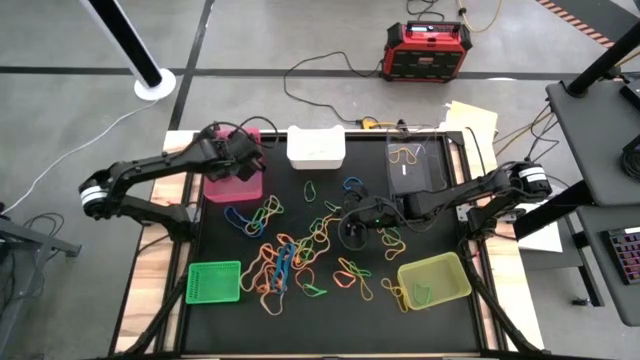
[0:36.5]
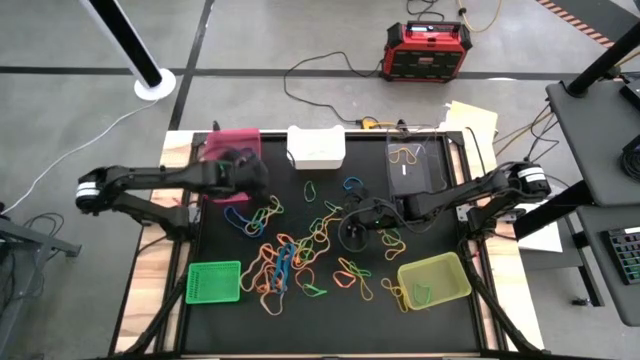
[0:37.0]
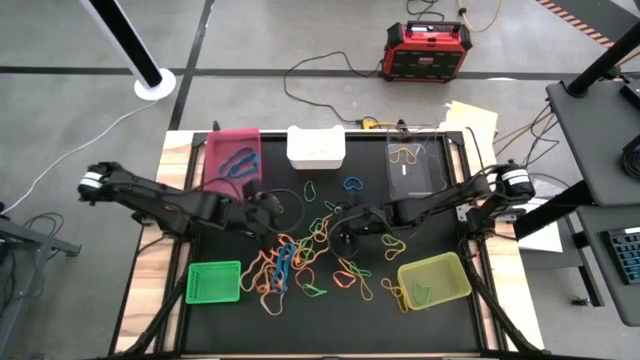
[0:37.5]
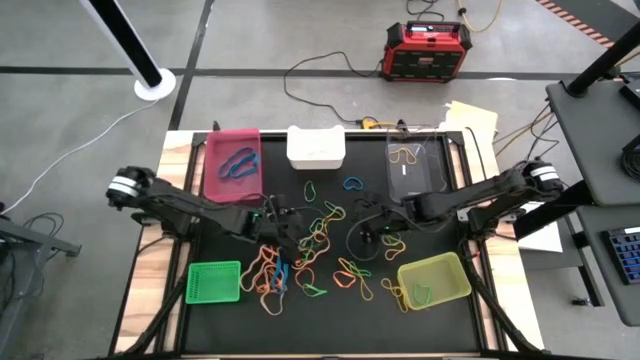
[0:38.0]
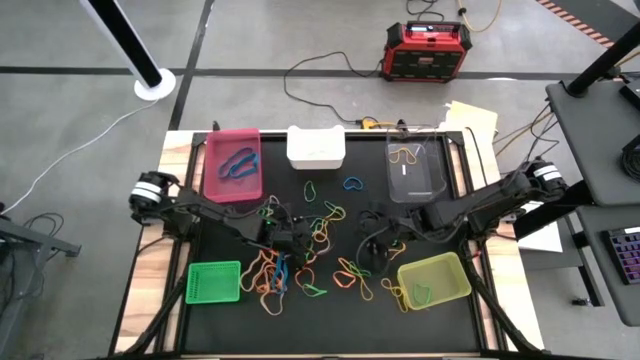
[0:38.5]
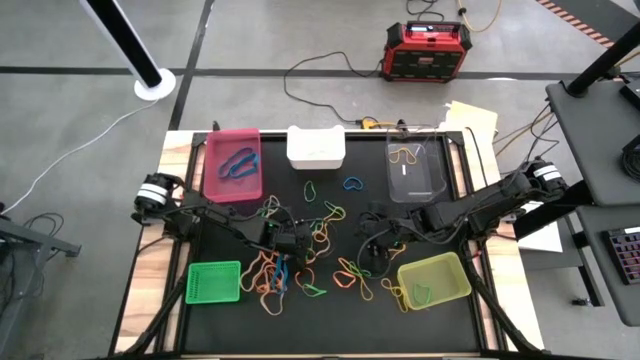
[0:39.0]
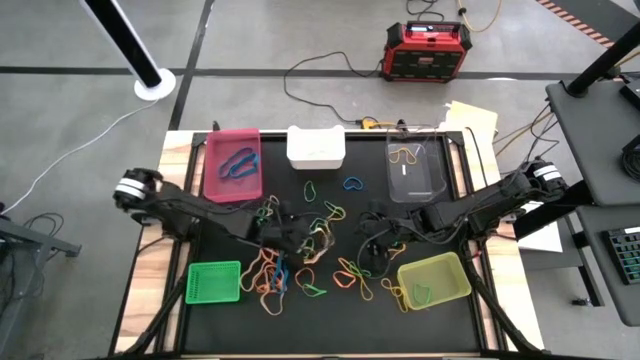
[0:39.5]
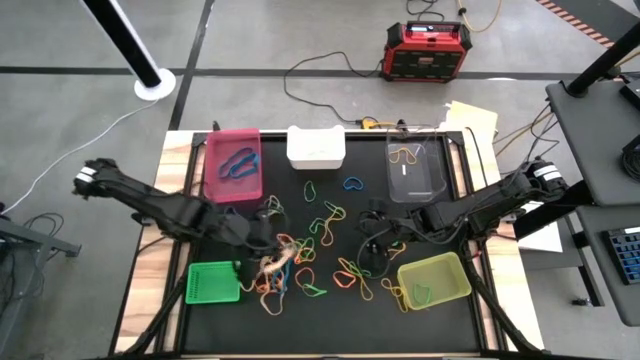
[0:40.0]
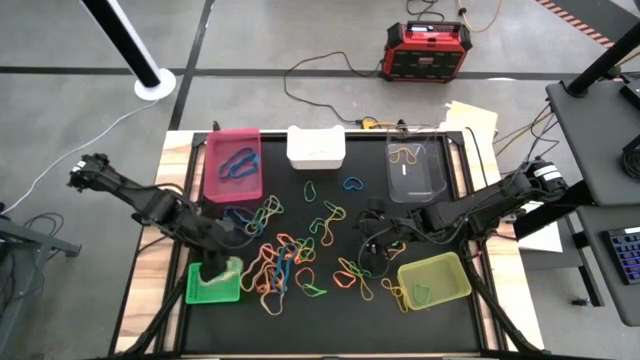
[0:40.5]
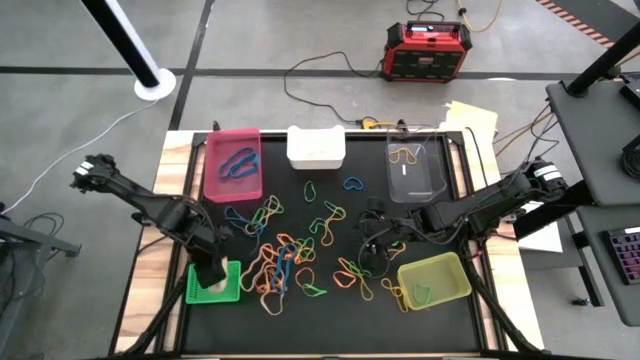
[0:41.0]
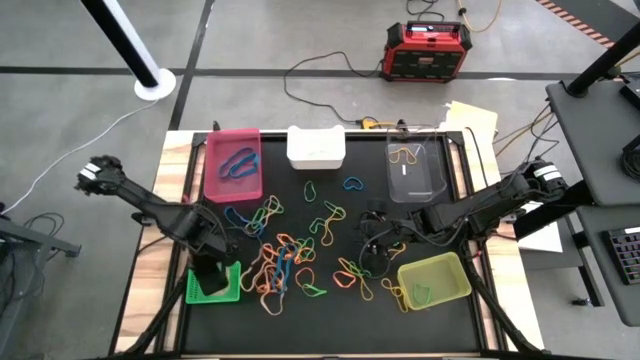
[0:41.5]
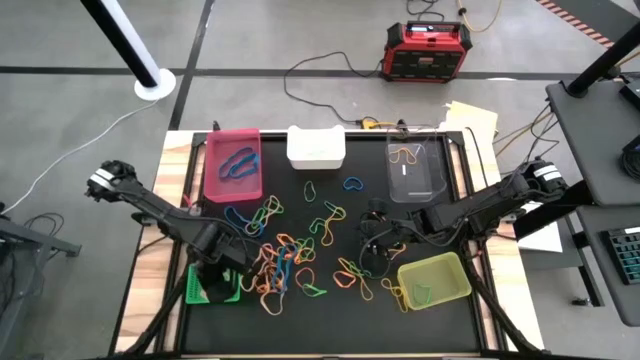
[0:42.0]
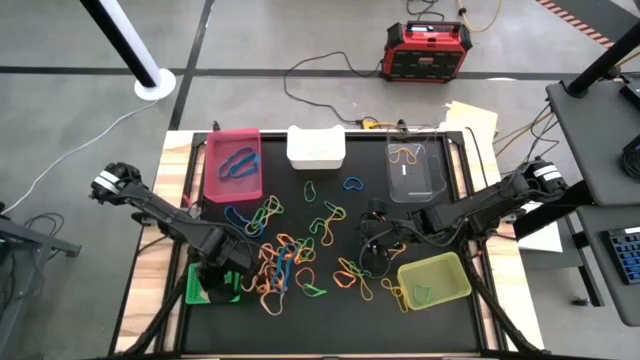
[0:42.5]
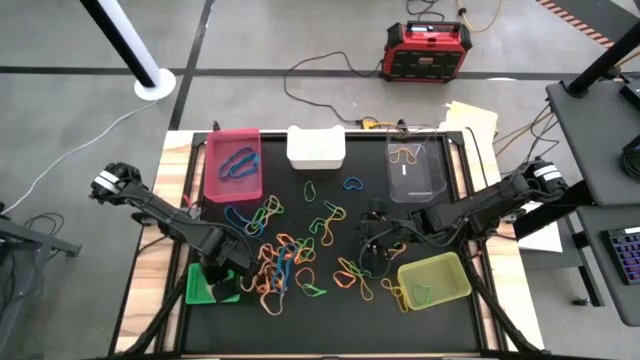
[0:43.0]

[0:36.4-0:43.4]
Task: Sort rubber bands into baskets
Put the light yellow rubber band into the green bin

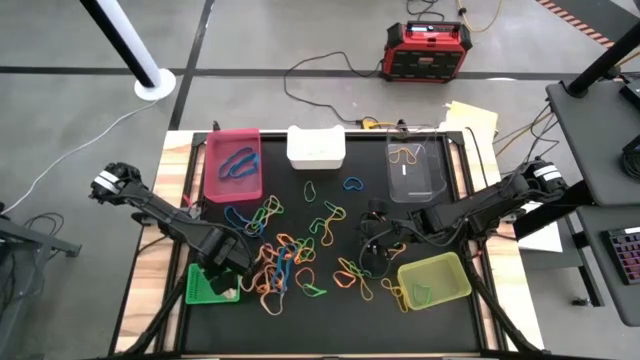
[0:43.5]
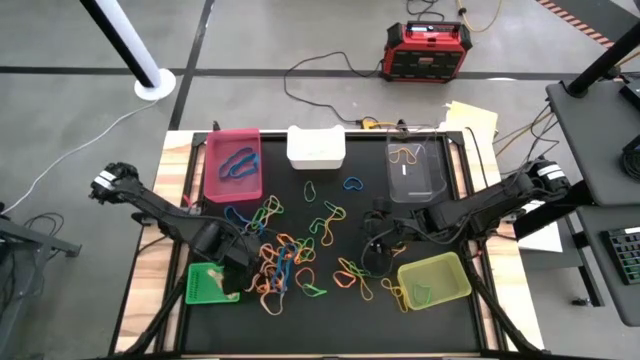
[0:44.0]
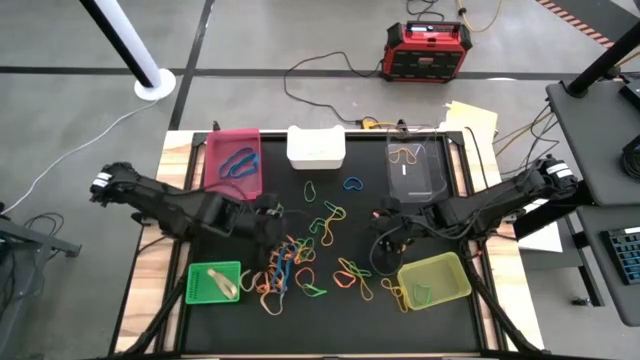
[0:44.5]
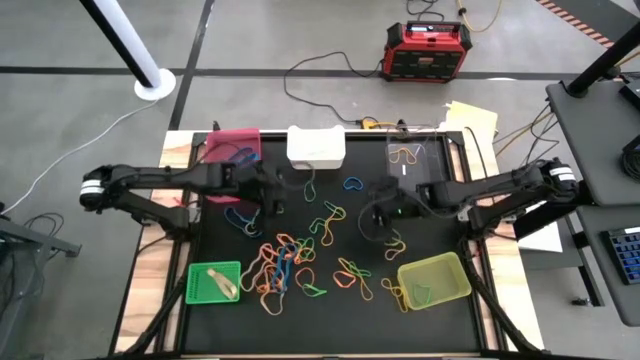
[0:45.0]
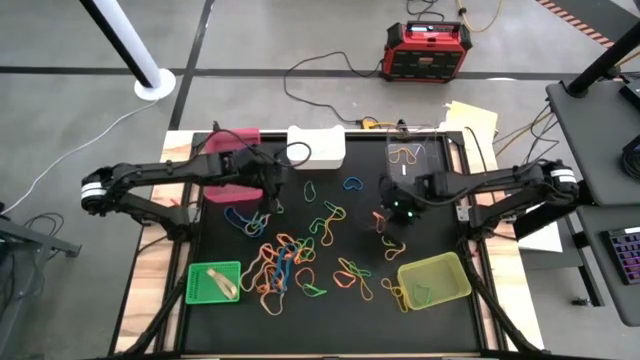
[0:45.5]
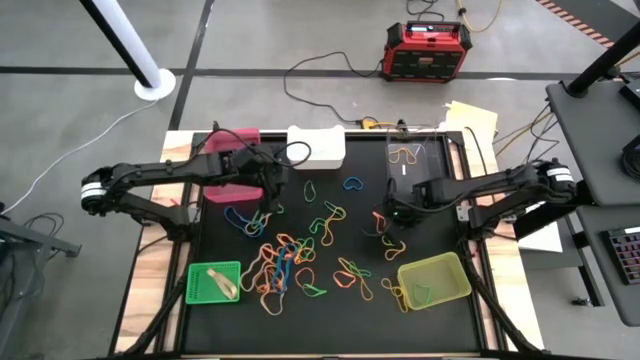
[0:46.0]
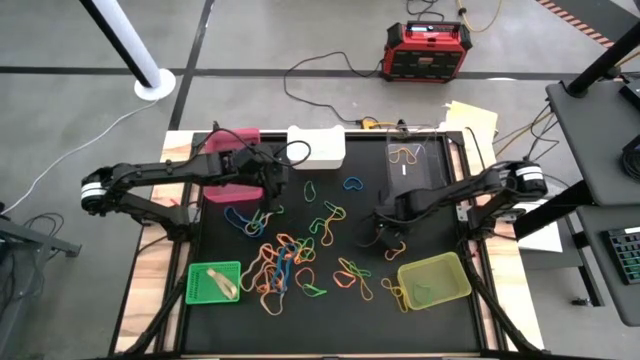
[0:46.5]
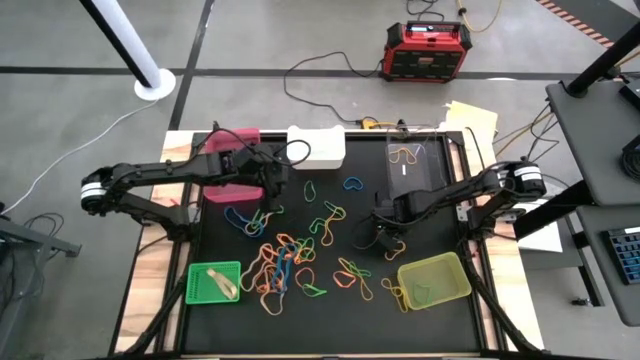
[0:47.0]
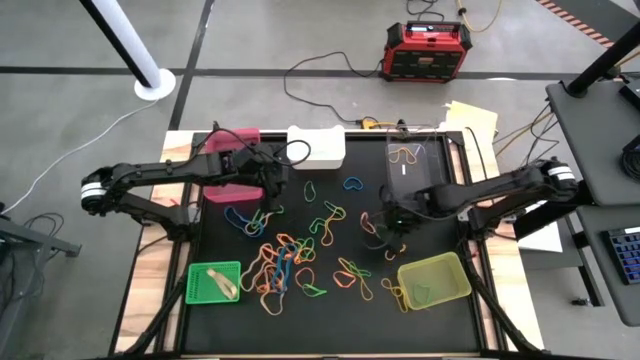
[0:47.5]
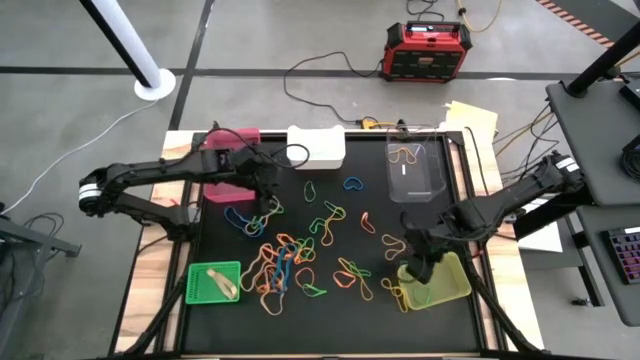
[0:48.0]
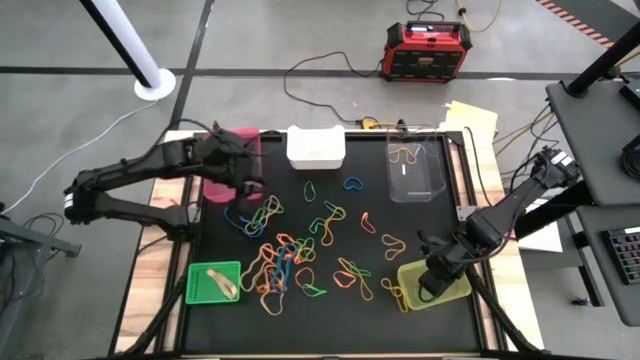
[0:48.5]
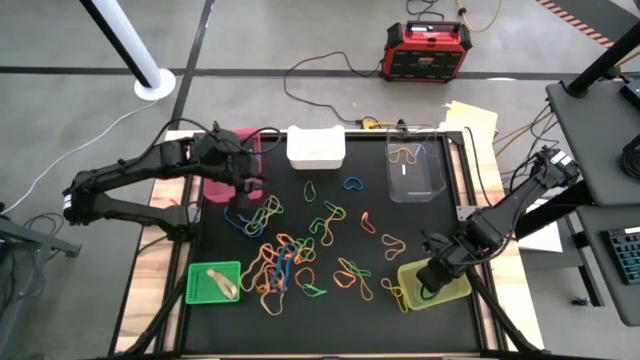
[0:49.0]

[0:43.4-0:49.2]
Put the green rubber band into the yellow bin

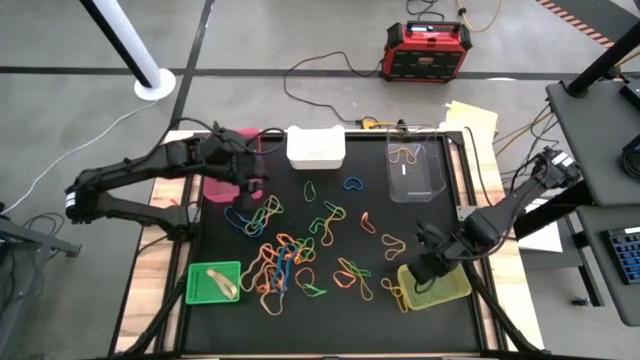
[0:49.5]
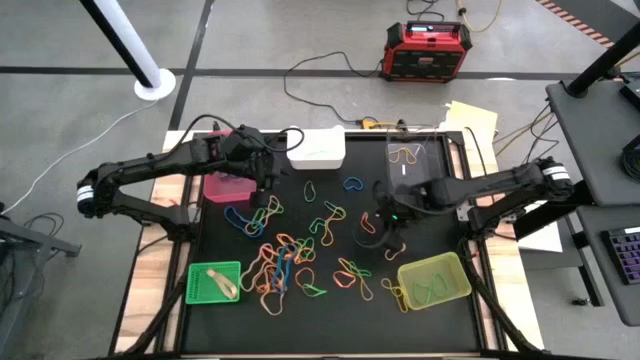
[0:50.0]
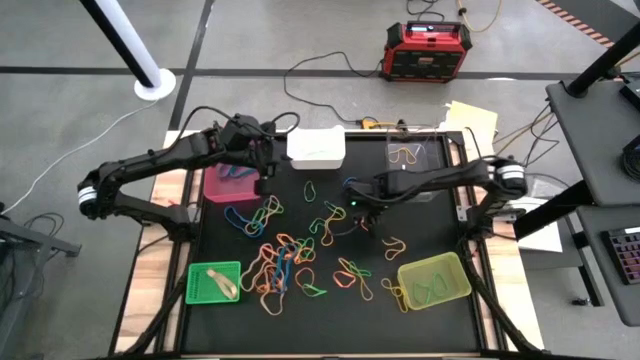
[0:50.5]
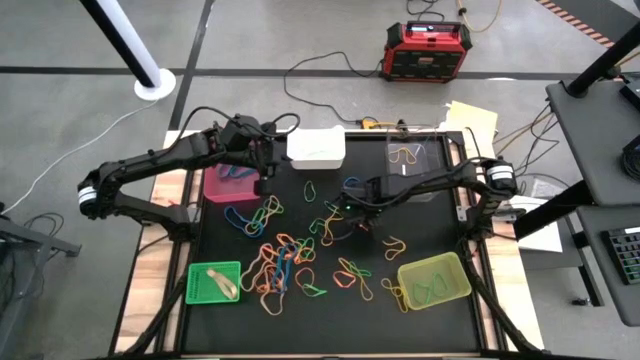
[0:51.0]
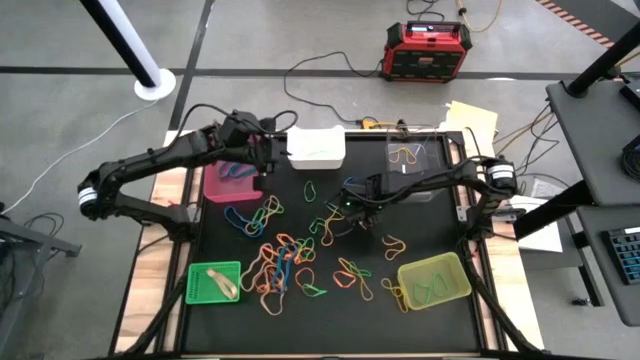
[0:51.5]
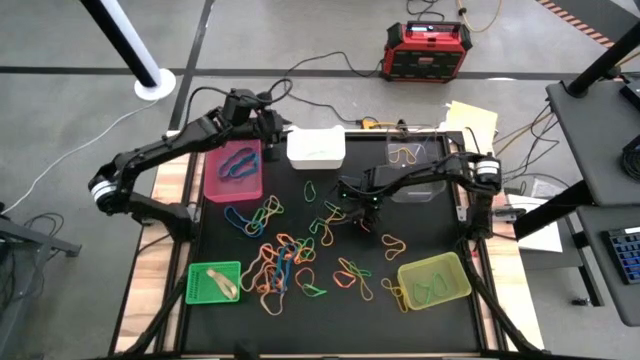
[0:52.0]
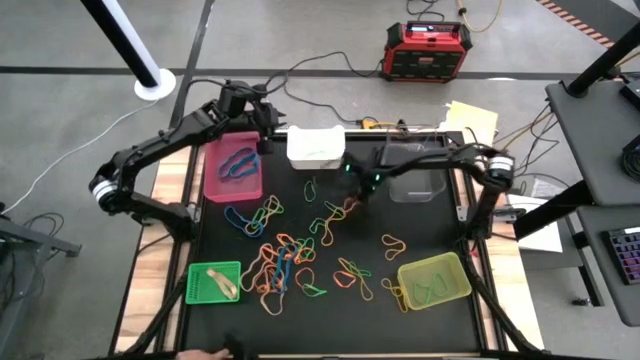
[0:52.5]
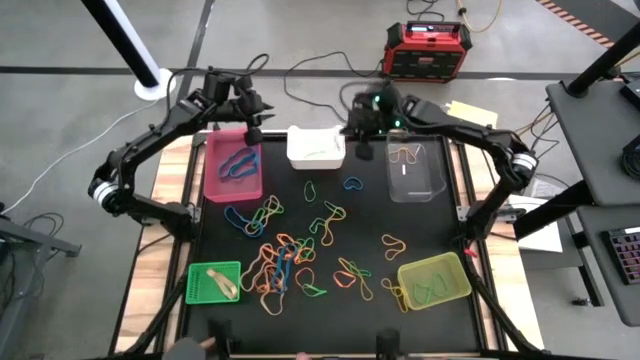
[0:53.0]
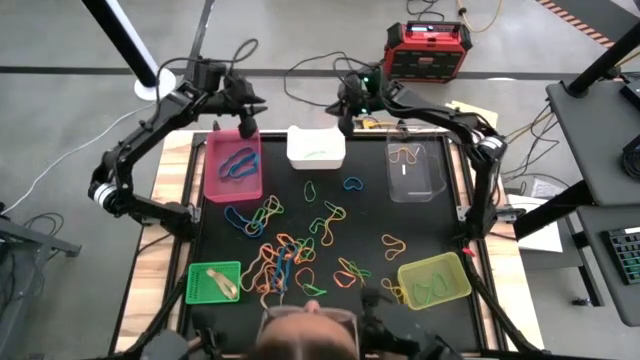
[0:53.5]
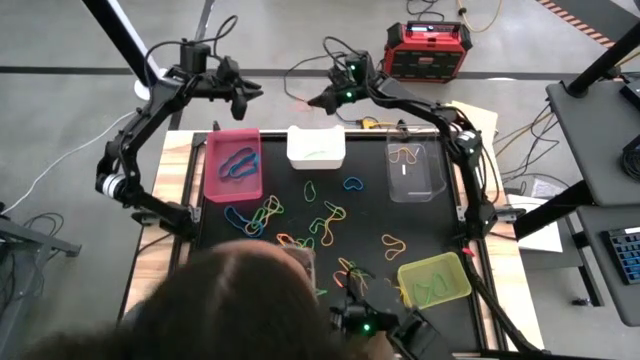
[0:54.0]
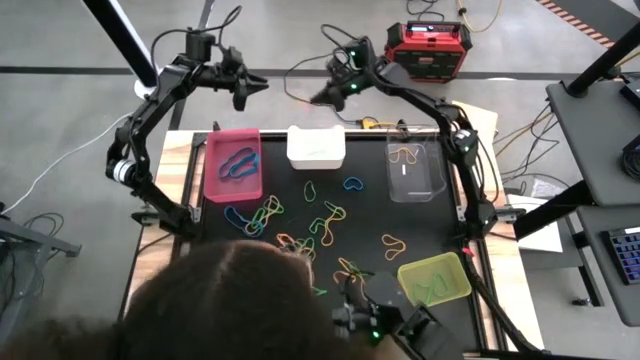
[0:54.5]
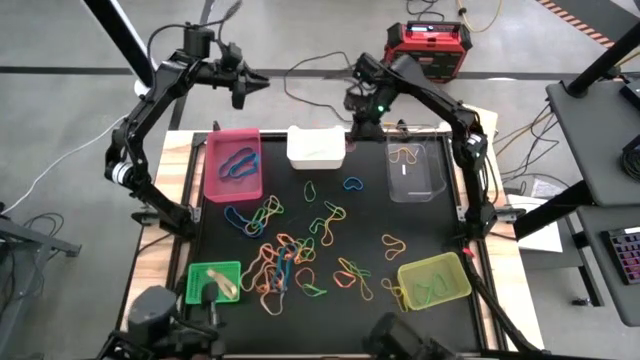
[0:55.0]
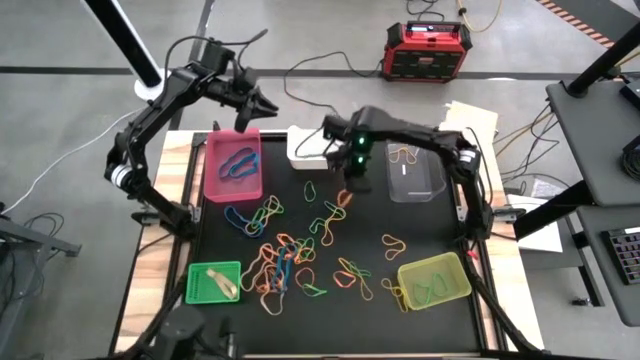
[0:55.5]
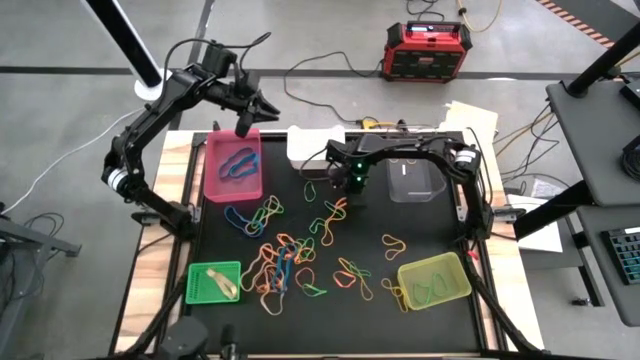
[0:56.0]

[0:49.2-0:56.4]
Put the orange rubber band into the white bin

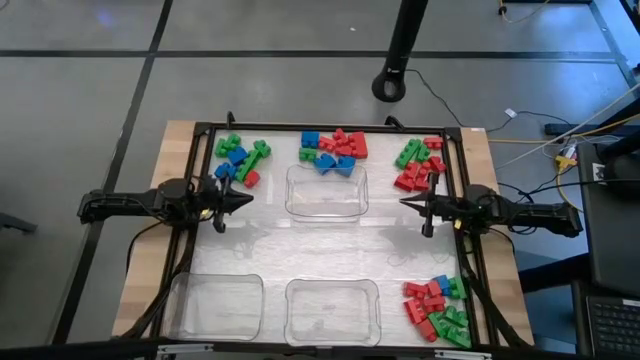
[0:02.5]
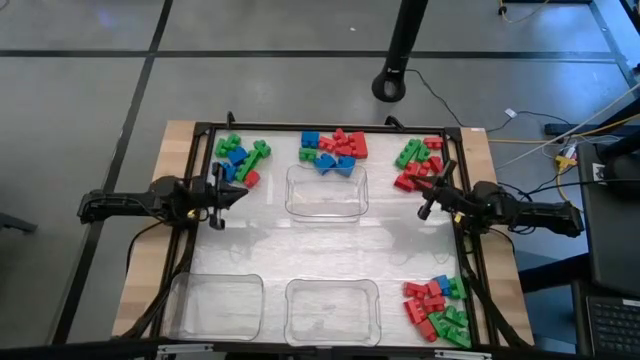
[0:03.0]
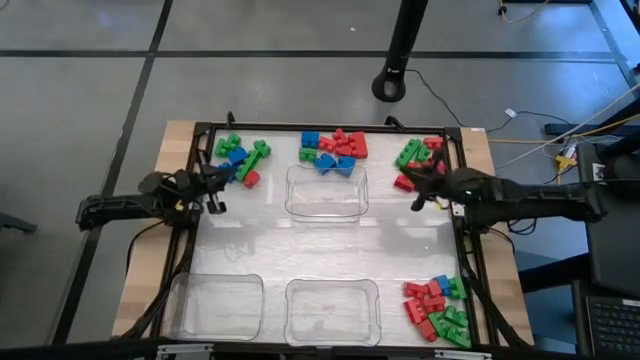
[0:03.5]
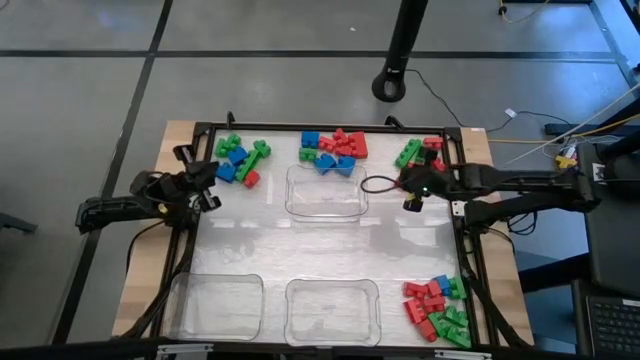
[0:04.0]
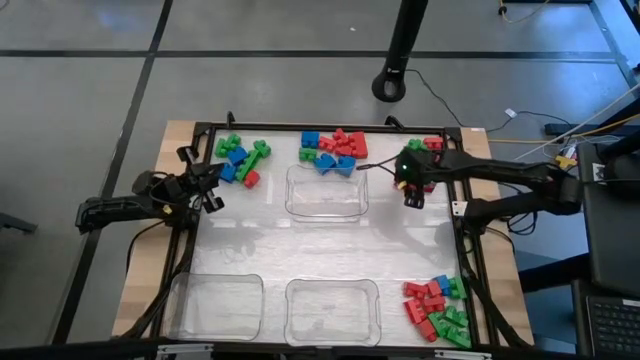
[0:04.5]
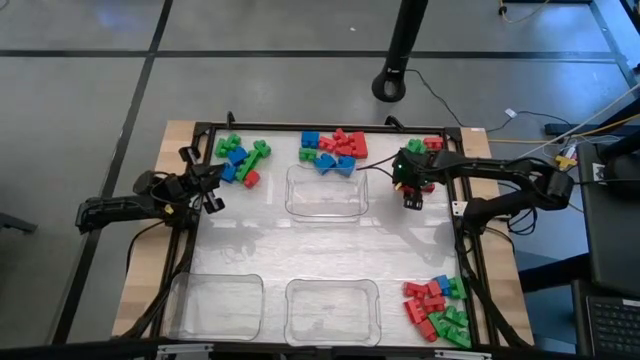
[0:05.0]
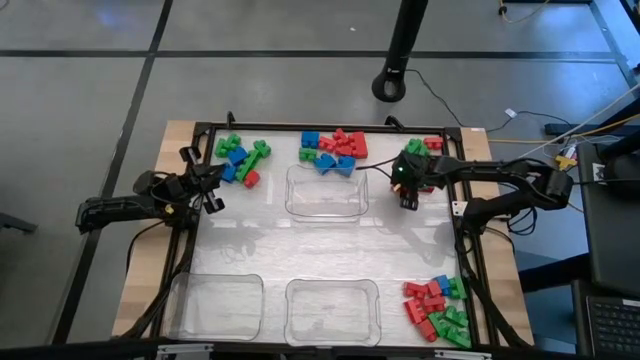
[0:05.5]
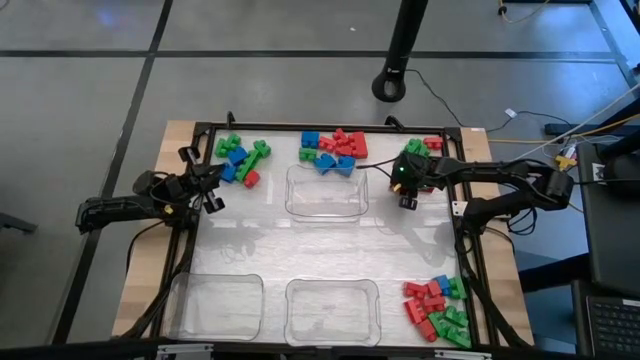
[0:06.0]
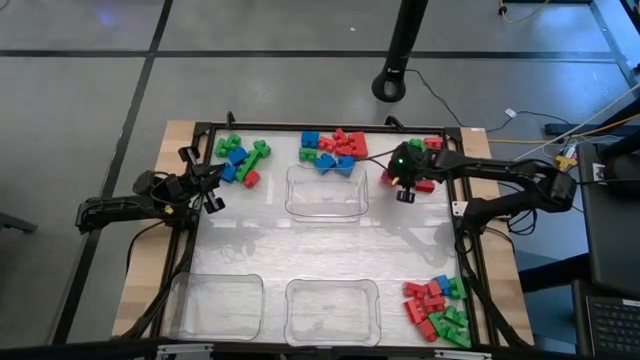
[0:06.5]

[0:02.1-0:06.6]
Task: Sort blocks
Put the red game piece into the top right transparent bin
